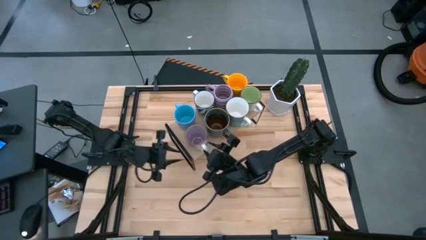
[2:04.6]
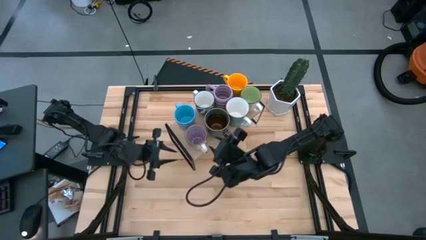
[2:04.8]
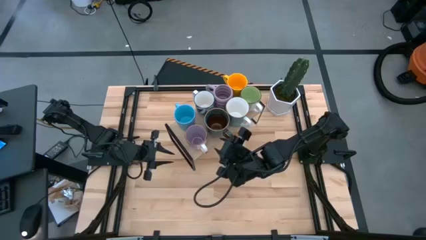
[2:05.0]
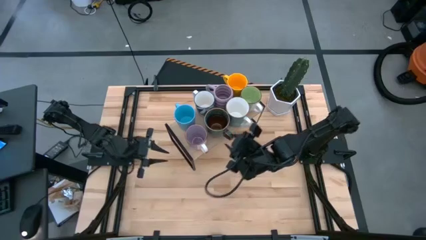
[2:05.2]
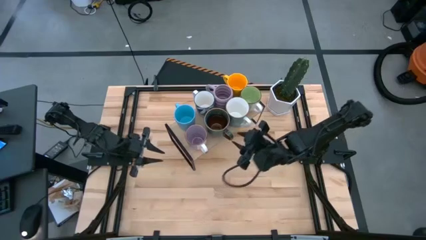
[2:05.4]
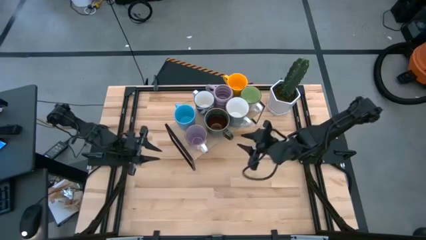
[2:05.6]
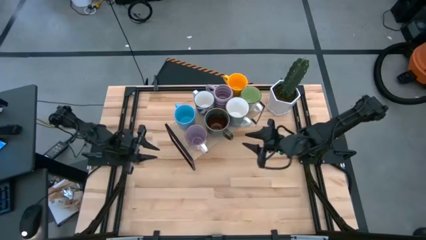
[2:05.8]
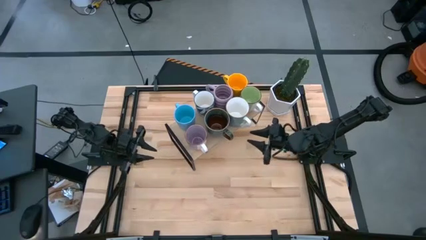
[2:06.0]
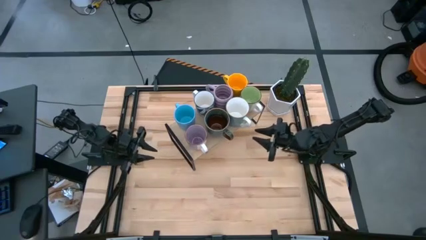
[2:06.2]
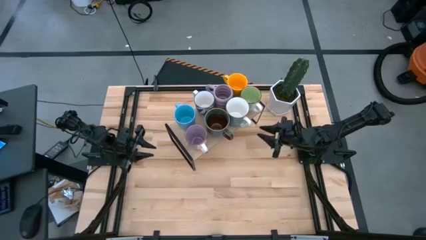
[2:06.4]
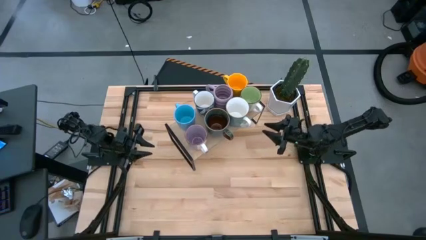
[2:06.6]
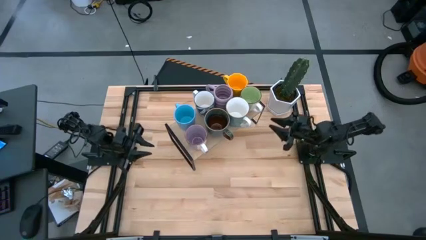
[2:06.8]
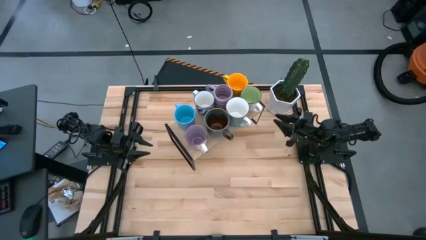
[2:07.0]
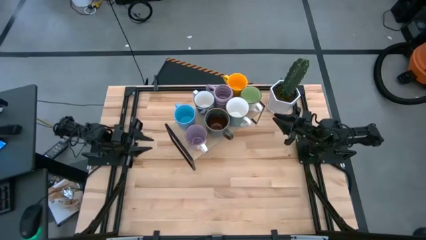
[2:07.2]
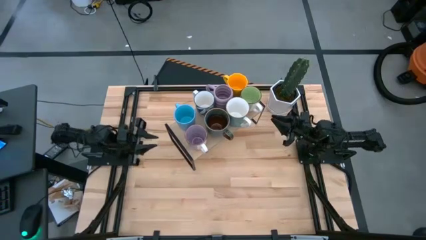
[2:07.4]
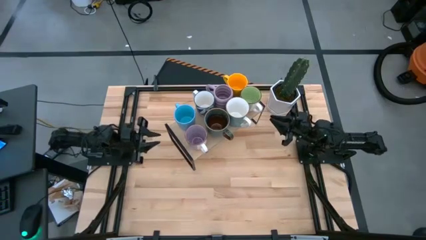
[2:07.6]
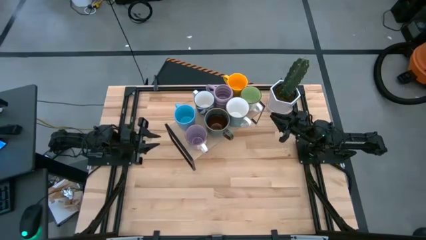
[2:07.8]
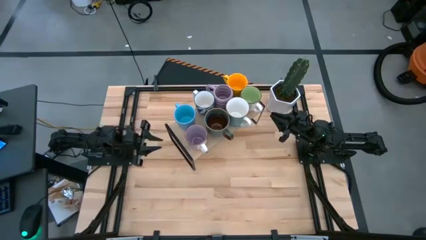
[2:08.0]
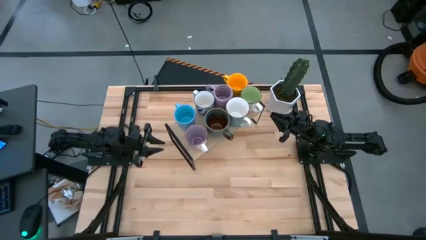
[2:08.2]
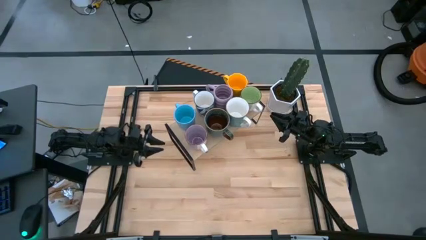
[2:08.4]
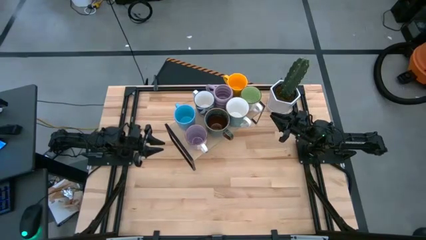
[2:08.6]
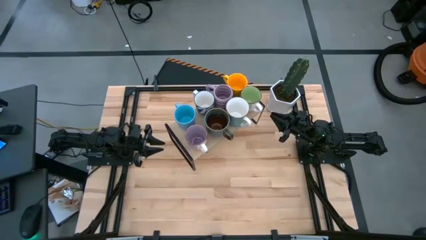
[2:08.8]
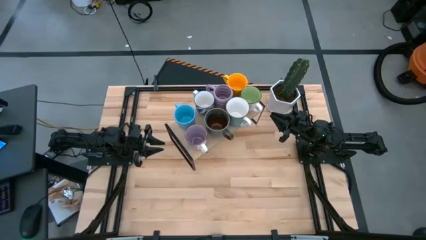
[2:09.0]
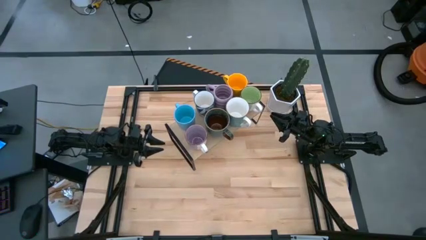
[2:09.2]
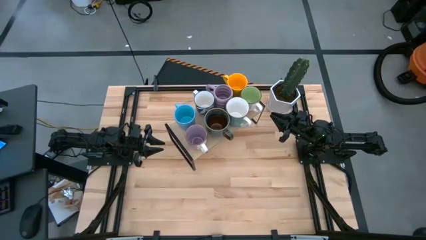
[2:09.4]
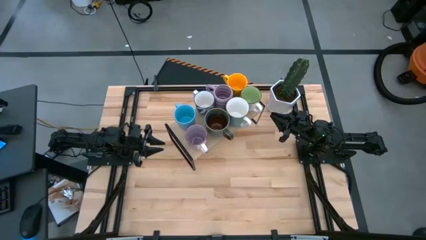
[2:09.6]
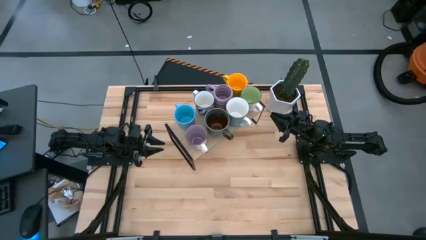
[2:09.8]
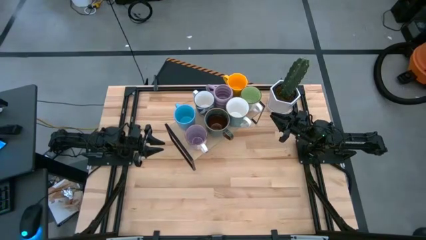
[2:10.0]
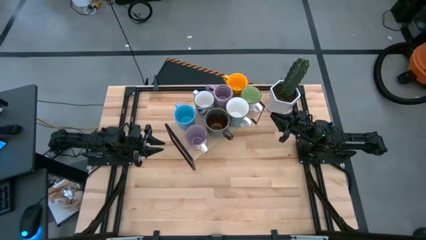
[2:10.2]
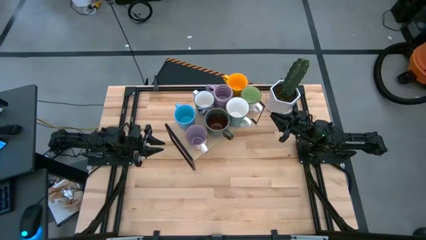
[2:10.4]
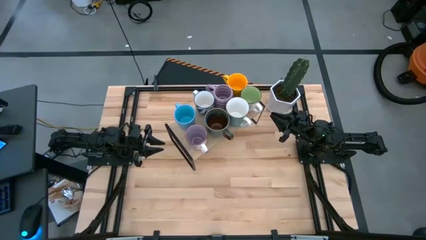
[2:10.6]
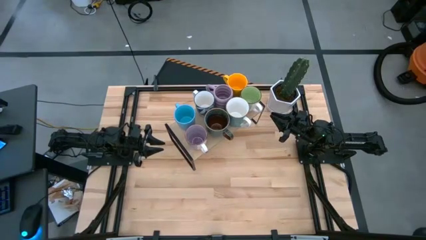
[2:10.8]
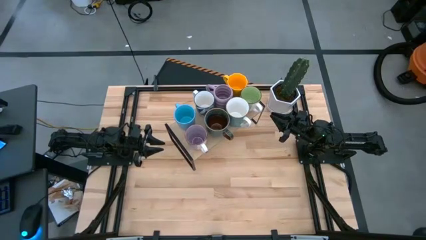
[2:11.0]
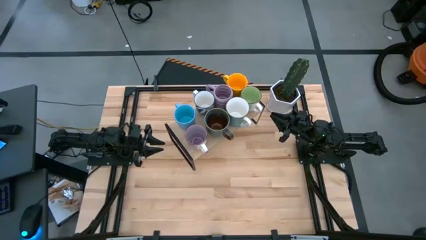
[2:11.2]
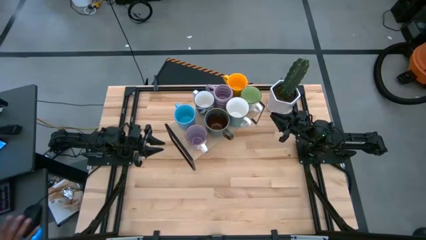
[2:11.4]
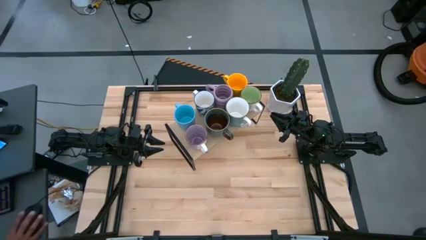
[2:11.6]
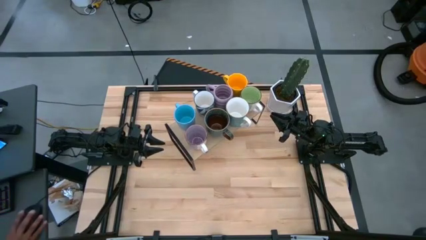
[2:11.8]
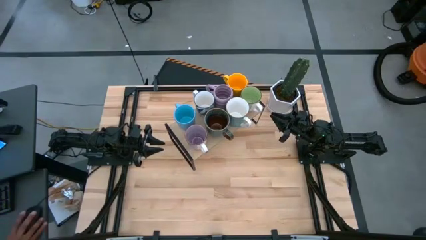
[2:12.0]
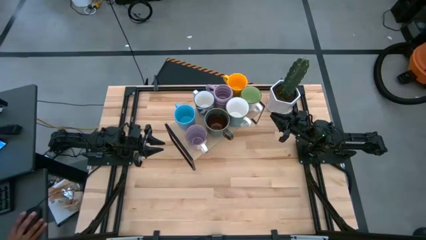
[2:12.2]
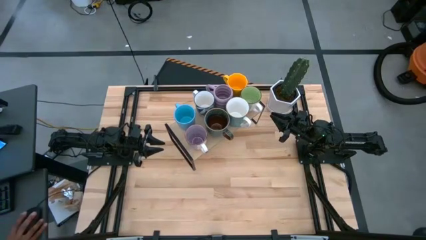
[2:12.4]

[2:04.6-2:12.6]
Task: Place coffee mugs
Return to Home Position

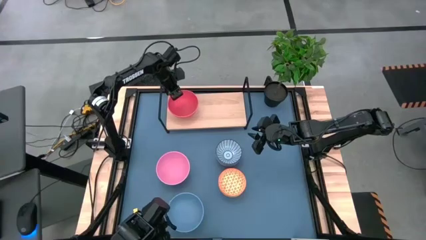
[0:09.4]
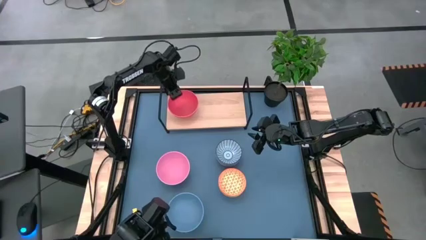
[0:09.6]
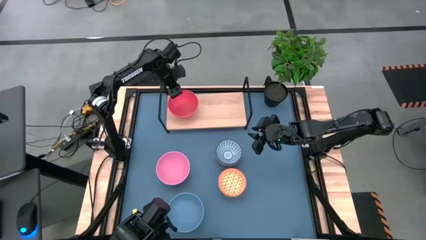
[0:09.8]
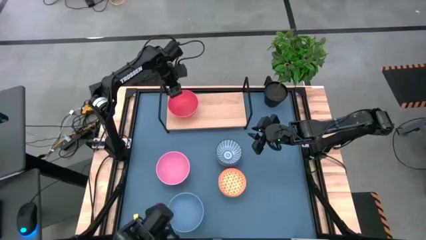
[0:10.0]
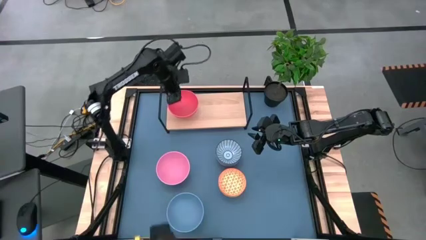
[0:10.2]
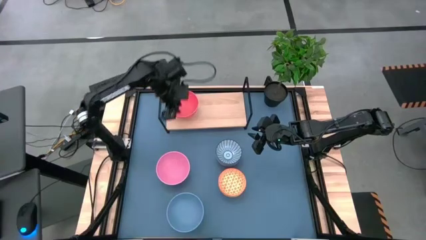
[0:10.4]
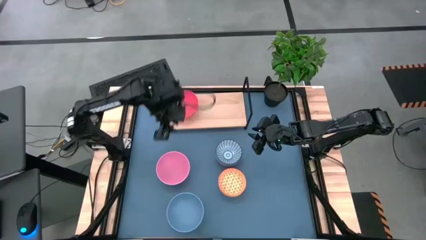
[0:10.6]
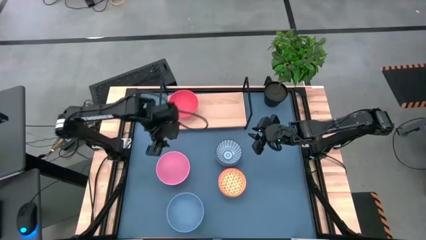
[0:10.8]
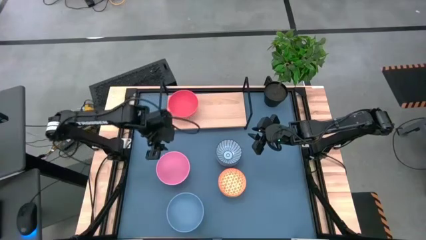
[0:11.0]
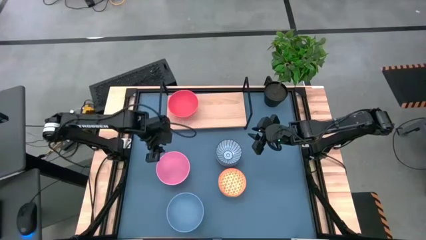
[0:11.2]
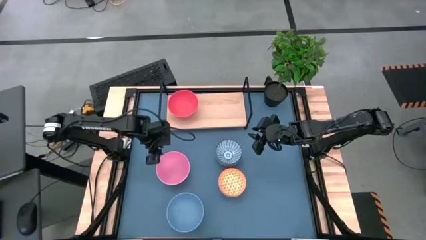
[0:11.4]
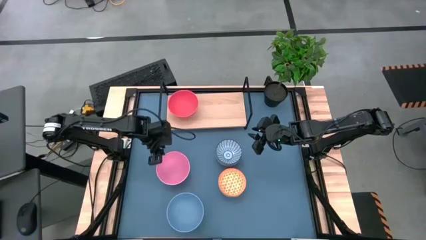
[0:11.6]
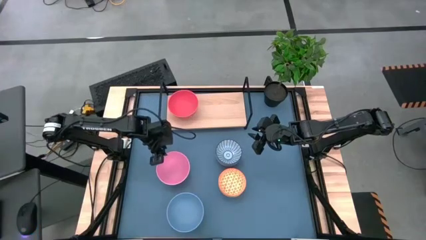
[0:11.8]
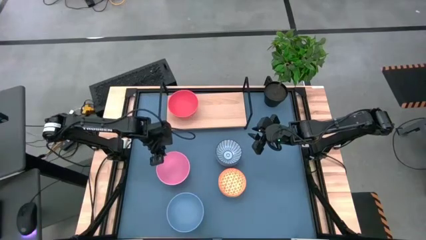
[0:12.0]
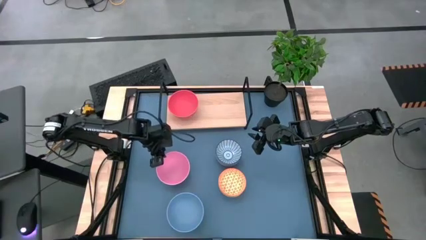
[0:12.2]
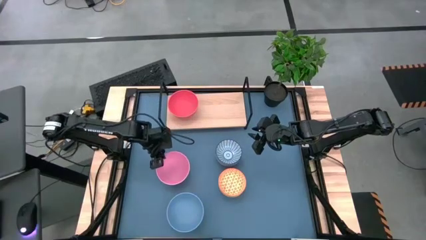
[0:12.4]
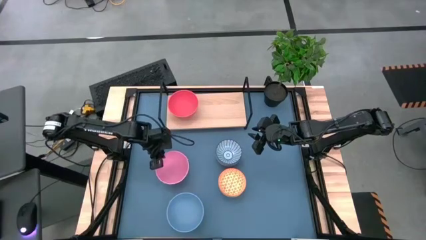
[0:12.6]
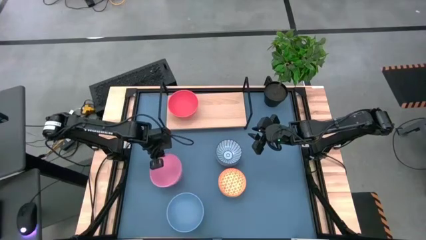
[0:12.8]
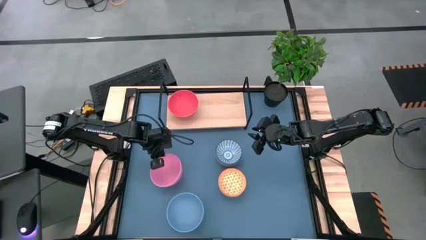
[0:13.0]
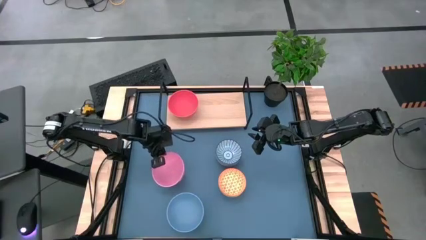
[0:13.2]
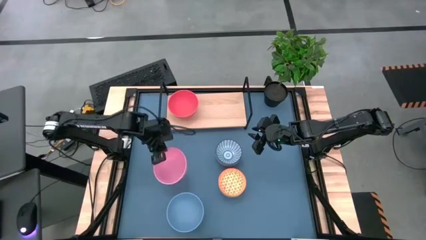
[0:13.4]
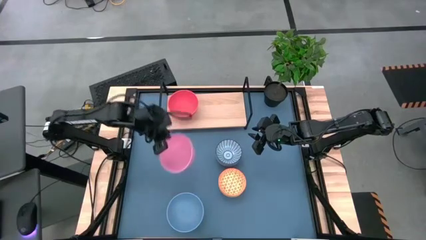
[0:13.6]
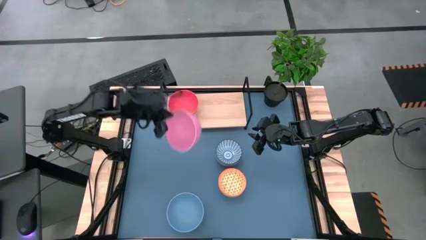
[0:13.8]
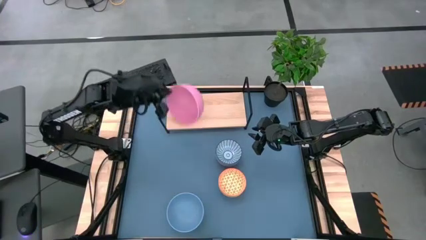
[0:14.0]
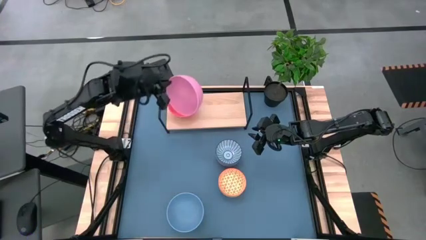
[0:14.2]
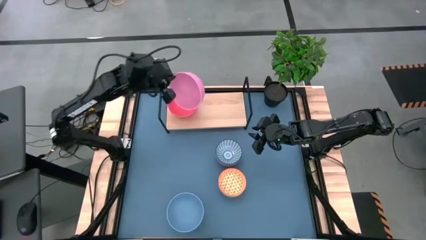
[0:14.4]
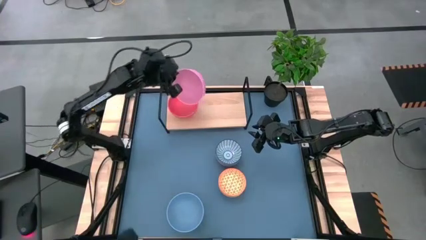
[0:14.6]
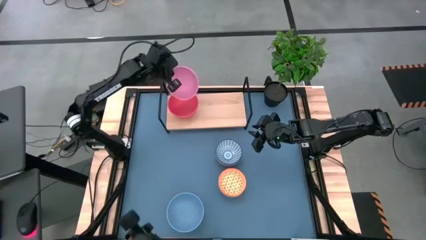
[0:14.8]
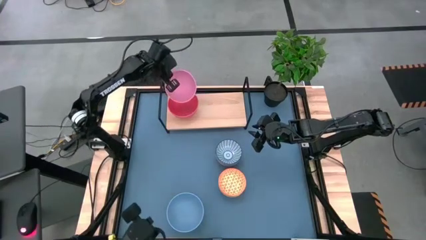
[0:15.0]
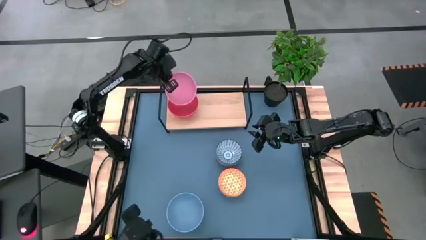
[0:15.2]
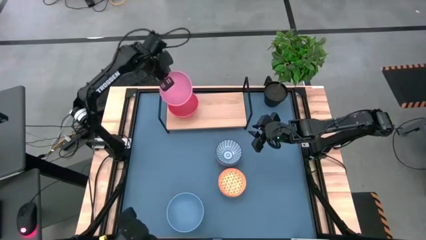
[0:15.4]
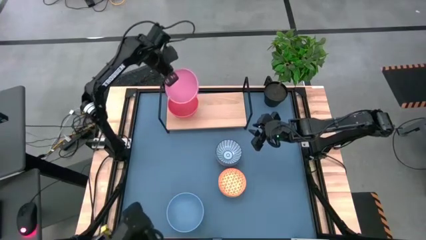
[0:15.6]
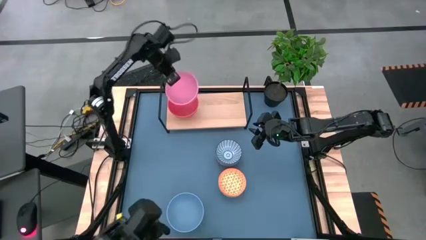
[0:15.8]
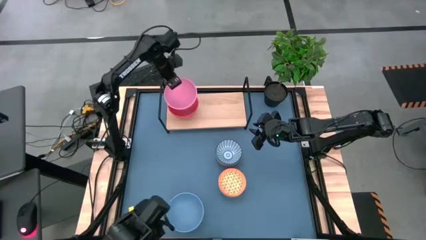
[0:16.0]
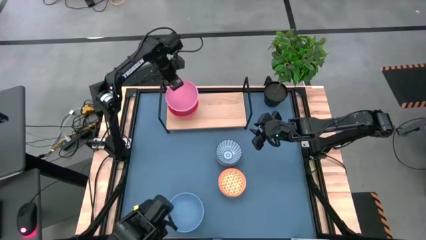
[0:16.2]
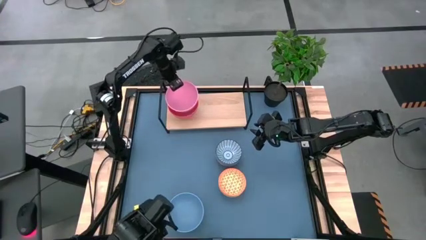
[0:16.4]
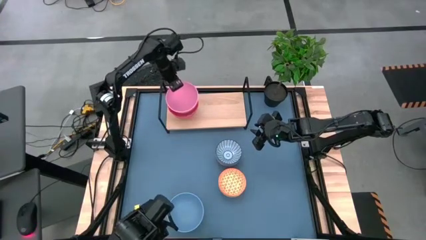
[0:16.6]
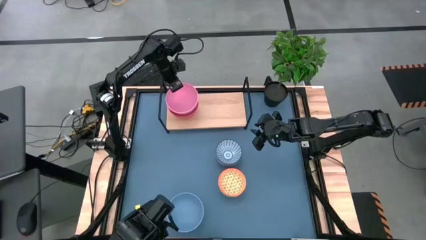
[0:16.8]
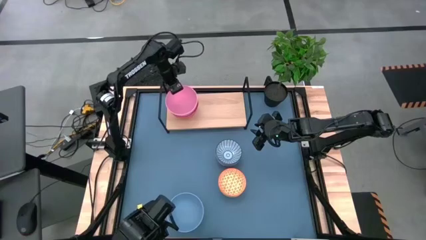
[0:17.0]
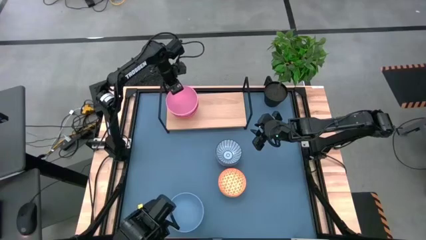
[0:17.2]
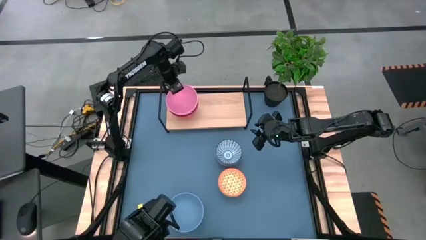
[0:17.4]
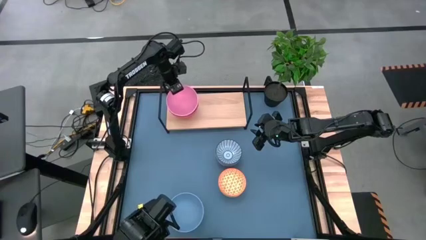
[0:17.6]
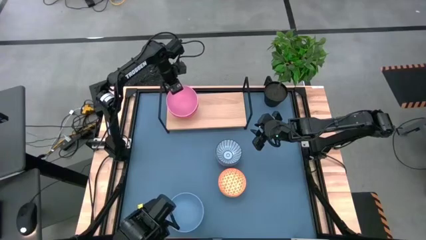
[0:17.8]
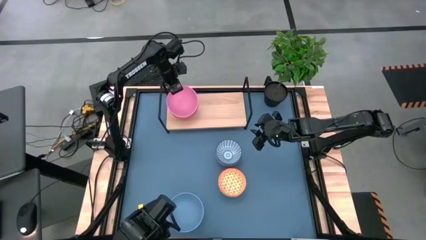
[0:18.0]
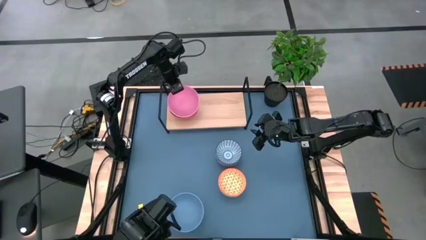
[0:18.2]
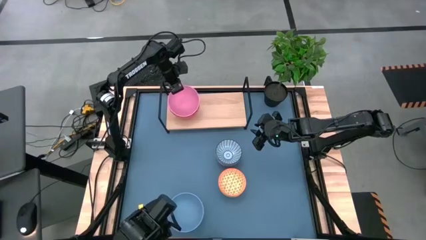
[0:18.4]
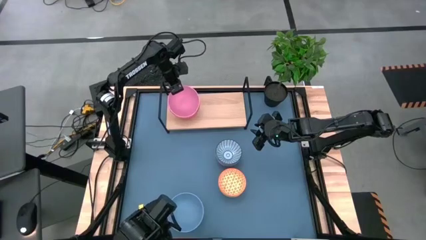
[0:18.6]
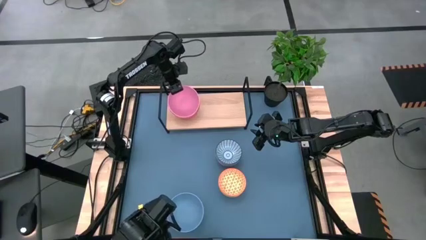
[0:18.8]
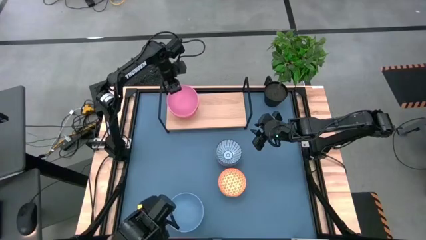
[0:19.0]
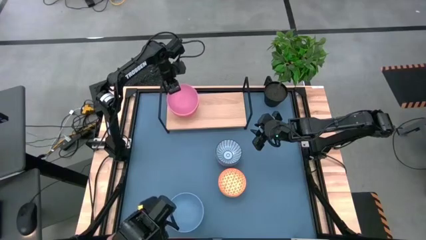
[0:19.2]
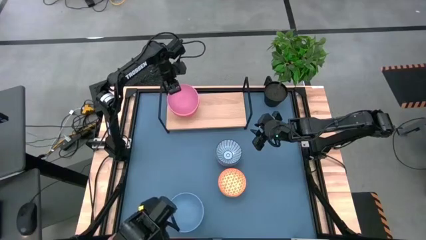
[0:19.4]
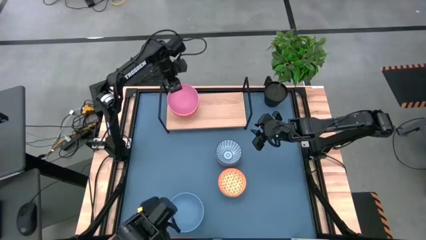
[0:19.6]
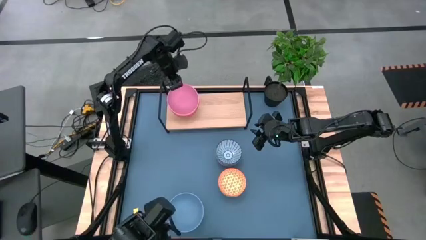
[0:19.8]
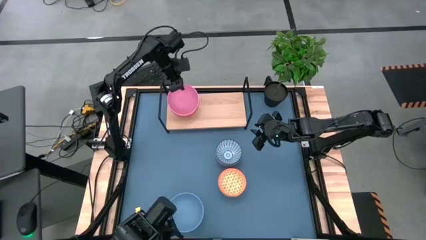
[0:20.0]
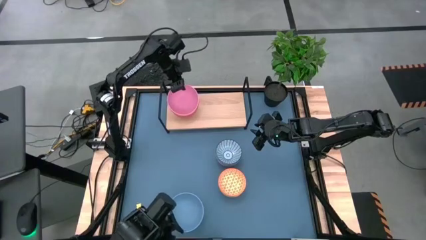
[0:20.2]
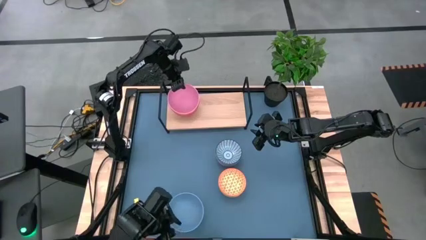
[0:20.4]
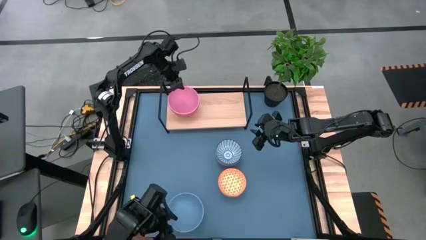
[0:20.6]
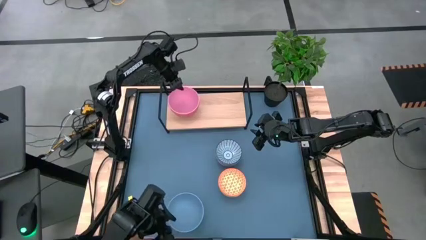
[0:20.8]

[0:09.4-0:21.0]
Task: Place and stack bowls onto a shelf
Stack the pink bowl on top of the orange bowl on the shelf
